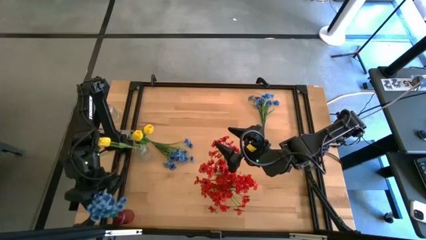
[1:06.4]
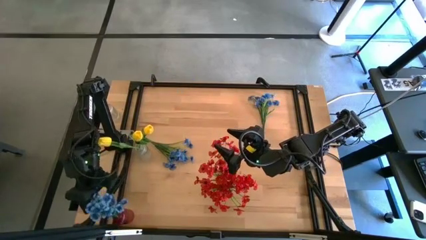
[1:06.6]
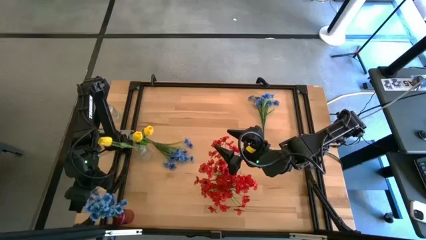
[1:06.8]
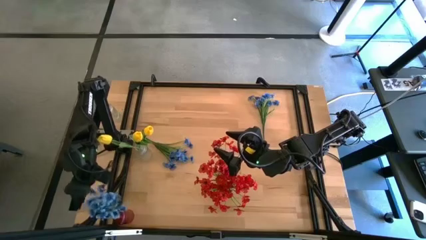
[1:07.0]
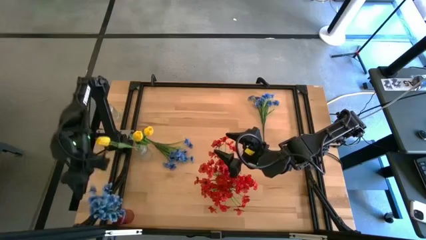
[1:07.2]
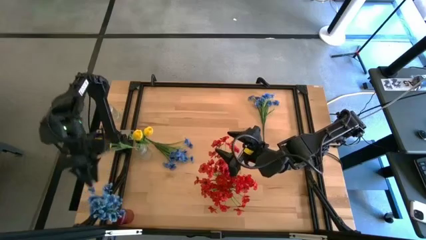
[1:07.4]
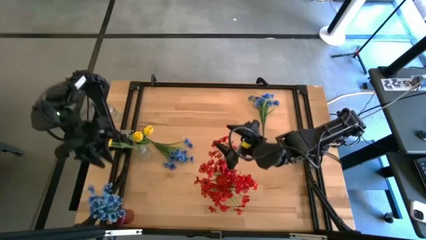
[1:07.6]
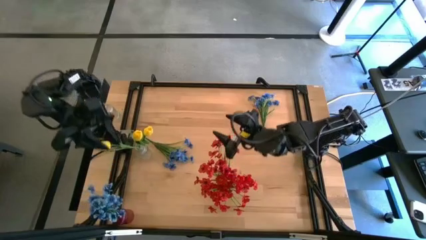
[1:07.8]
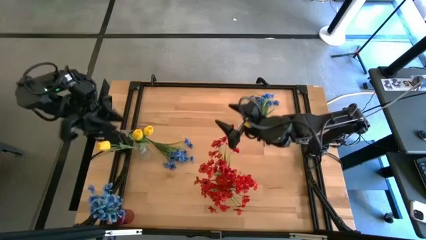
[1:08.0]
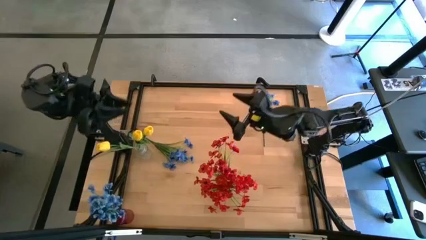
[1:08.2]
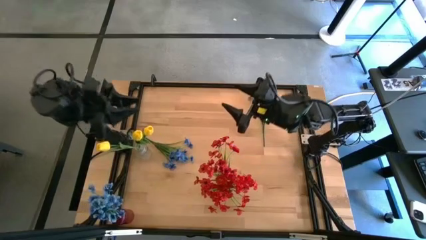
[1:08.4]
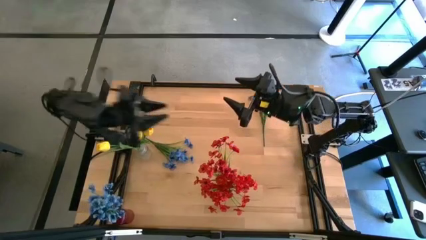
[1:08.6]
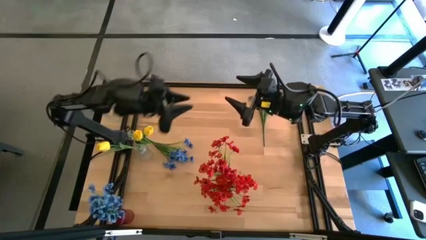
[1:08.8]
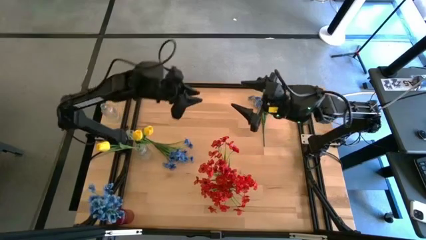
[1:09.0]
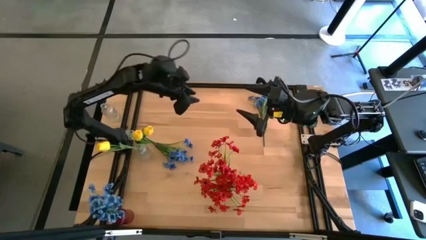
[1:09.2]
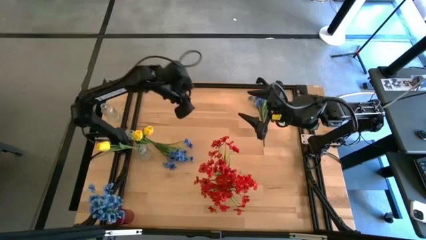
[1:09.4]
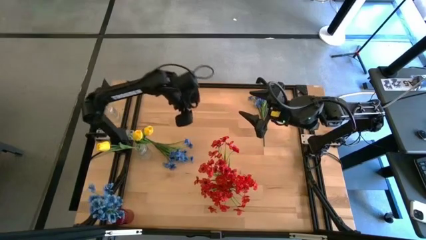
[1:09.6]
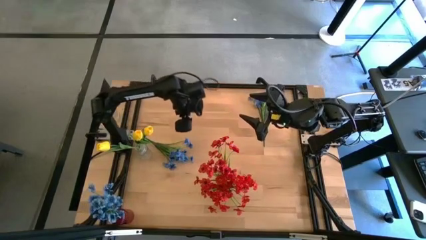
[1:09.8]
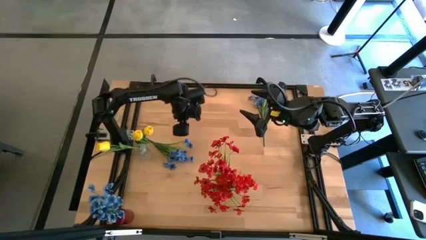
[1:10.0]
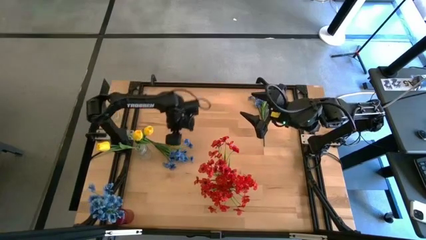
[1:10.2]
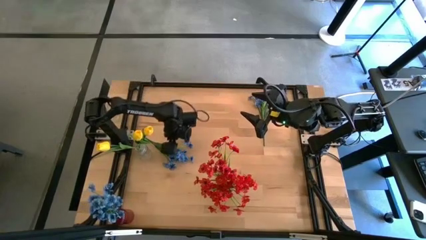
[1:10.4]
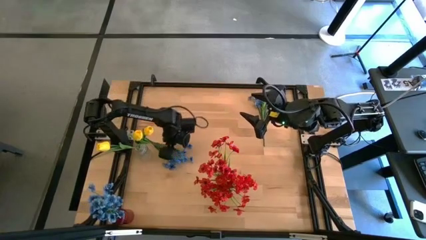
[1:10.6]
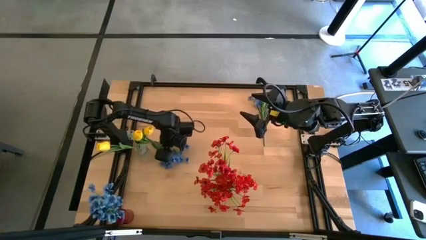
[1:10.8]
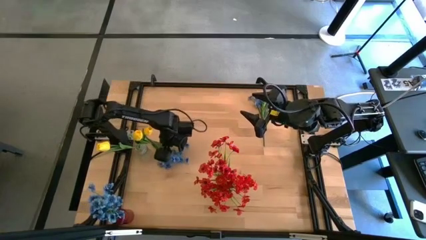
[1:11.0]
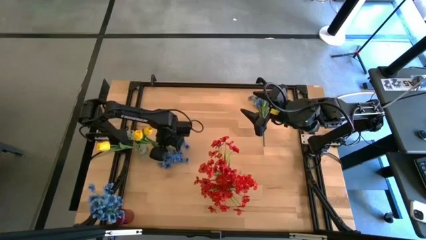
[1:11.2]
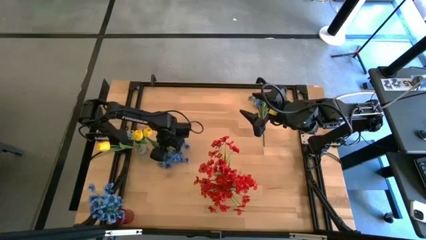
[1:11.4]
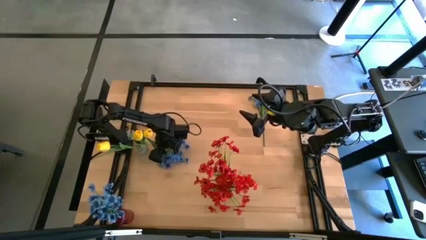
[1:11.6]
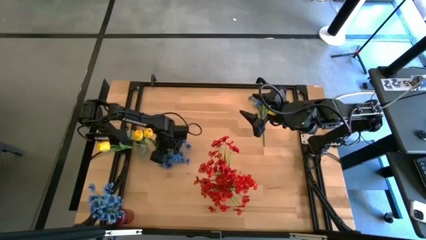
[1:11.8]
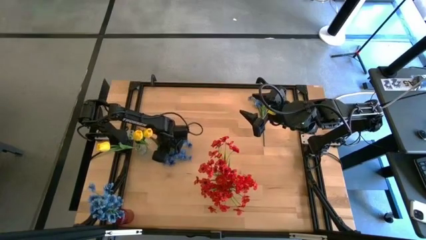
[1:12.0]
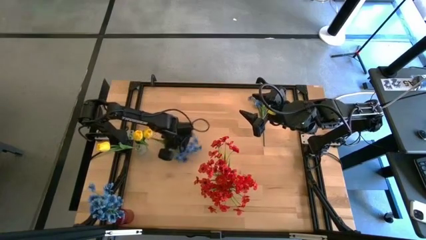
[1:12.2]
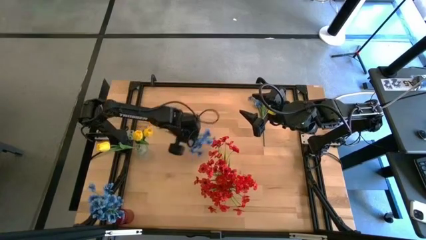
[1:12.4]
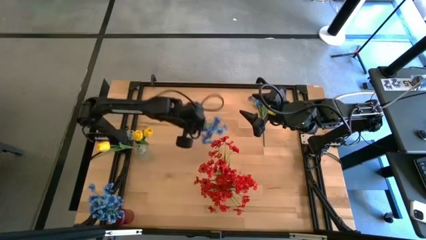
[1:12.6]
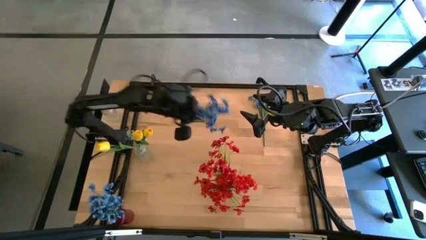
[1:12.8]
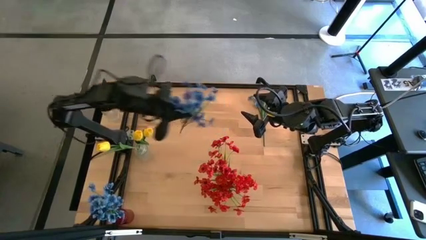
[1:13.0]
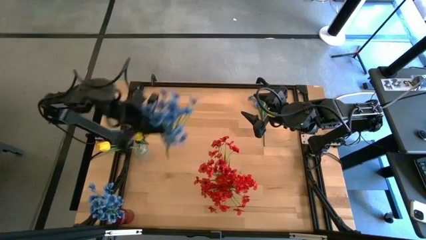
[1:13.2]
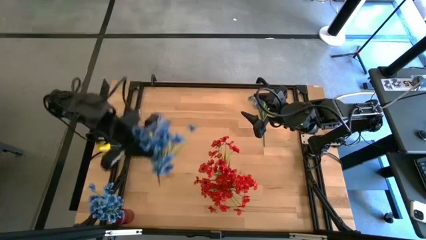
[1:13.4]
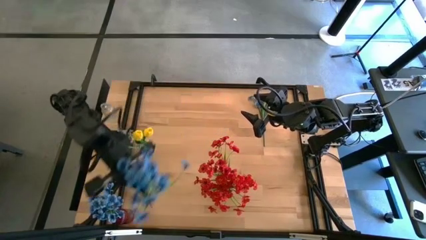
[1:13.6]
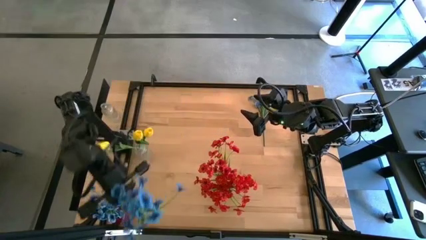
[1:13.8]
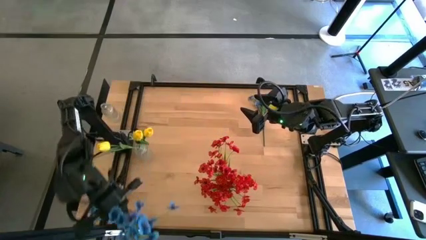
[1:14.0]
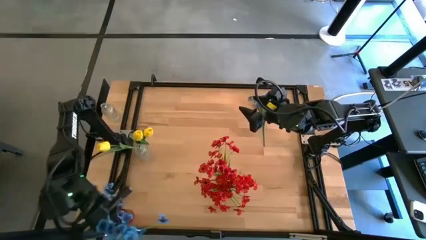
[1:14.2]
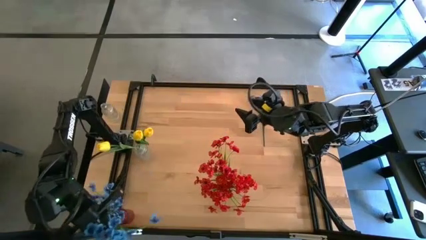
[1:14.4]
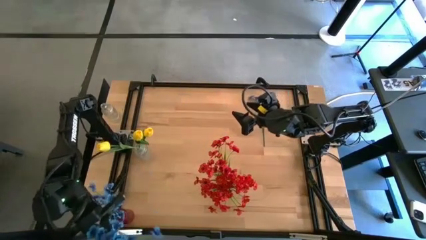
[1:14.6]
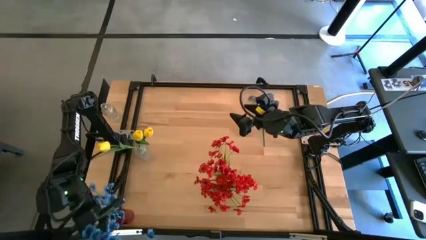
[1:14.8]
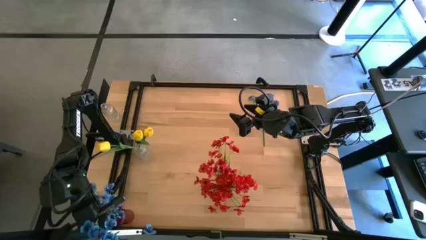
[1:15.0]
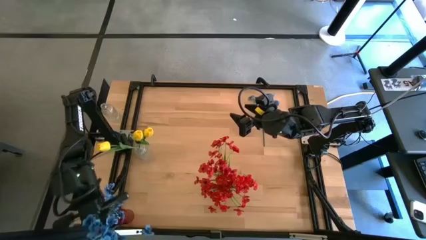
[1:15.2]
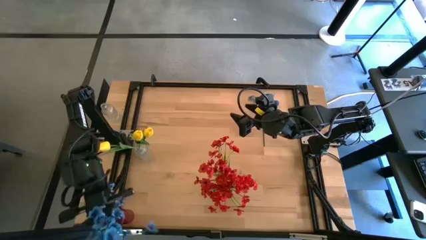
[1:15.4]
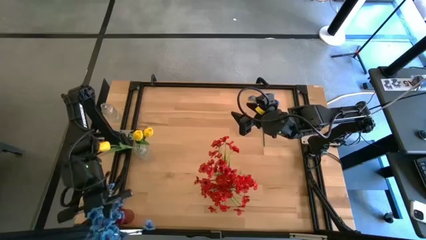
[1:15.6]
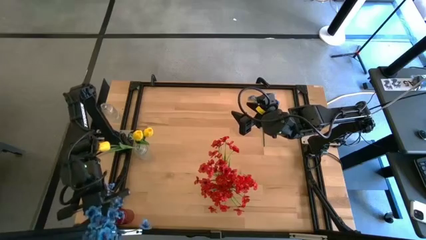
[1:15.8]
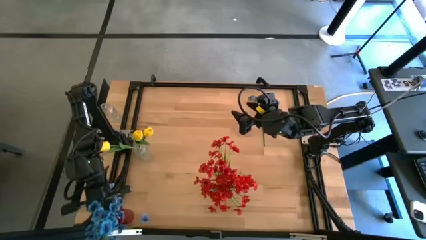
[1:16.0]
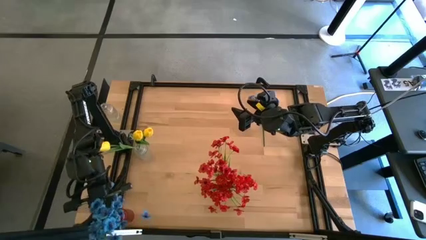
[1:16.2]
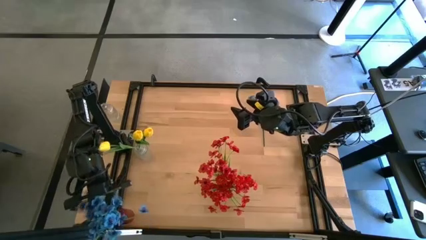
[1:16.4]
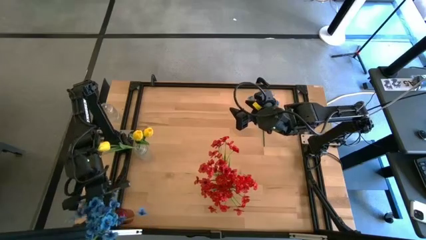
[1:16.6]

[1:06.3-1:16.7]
Task: Sort flowers into vase by color
Put the bottom blue flowers into the red vase

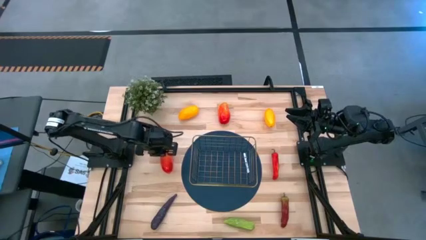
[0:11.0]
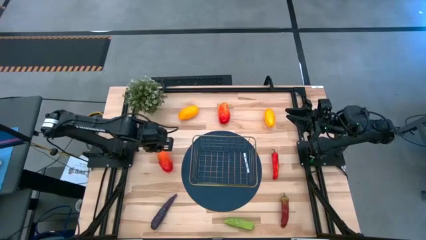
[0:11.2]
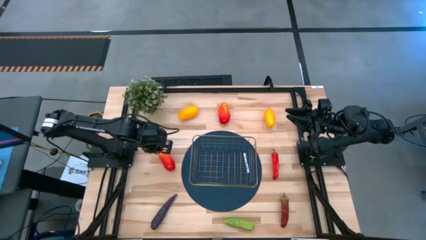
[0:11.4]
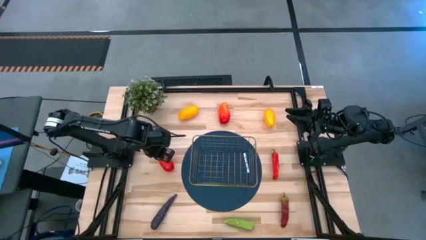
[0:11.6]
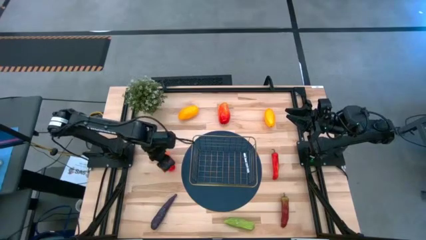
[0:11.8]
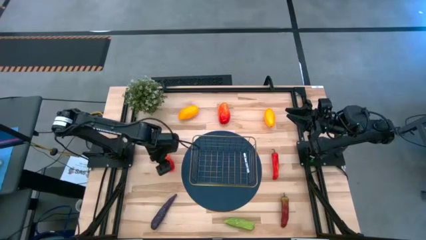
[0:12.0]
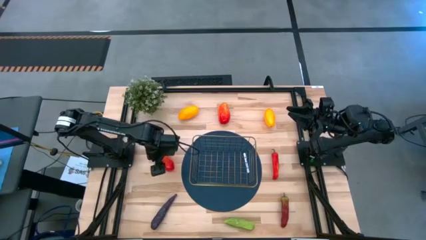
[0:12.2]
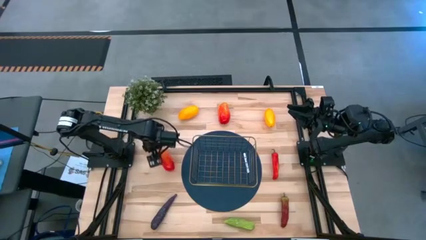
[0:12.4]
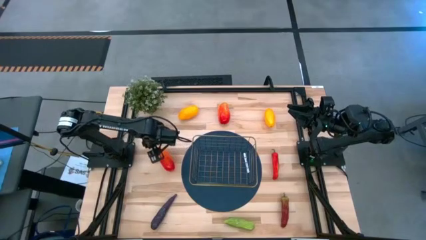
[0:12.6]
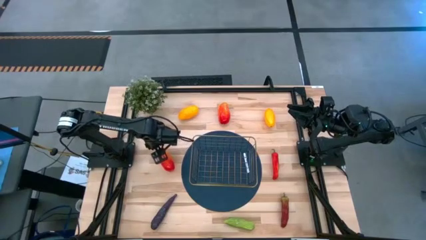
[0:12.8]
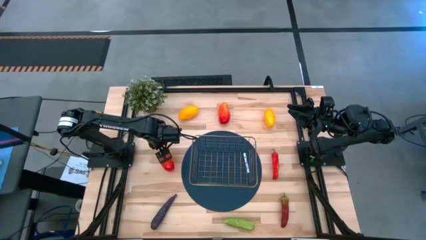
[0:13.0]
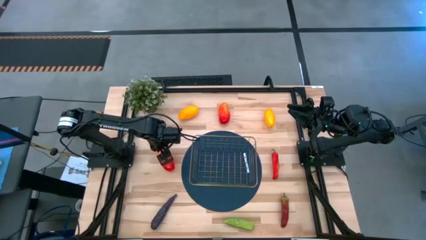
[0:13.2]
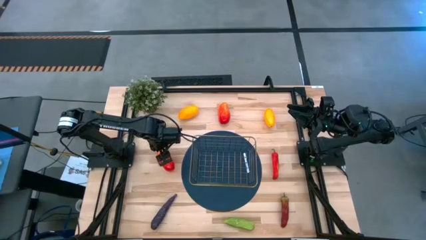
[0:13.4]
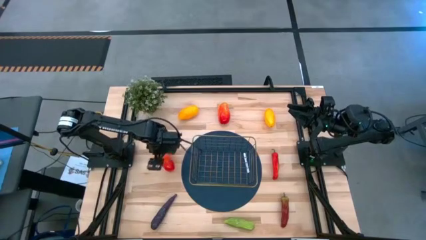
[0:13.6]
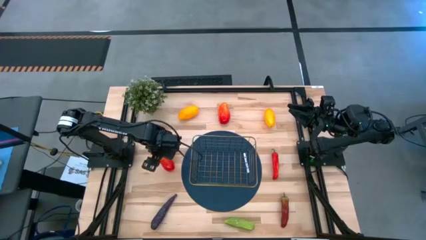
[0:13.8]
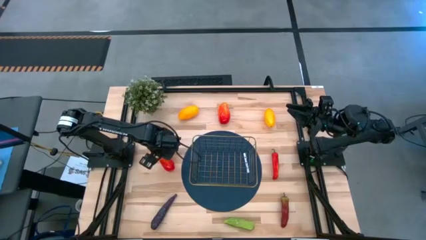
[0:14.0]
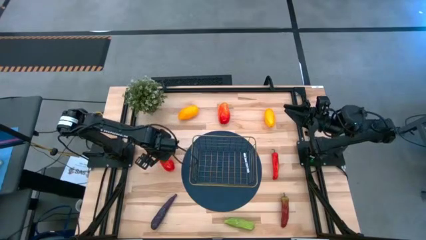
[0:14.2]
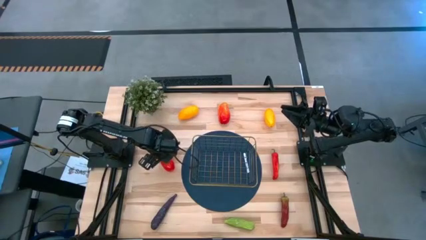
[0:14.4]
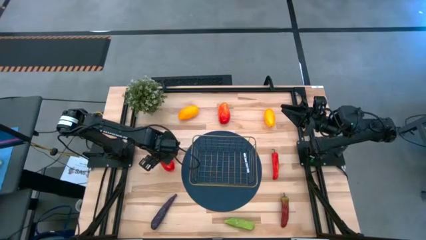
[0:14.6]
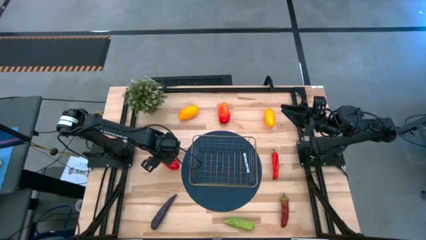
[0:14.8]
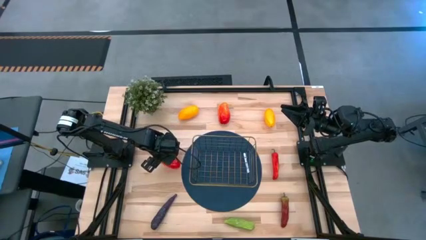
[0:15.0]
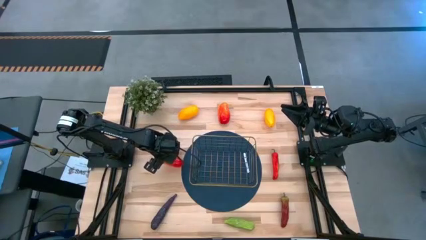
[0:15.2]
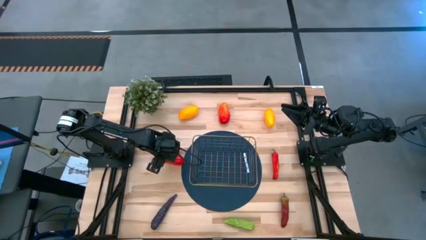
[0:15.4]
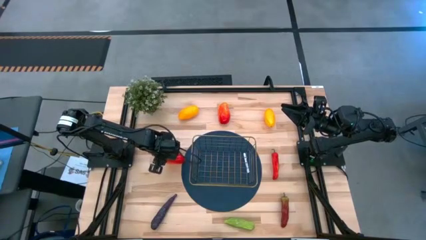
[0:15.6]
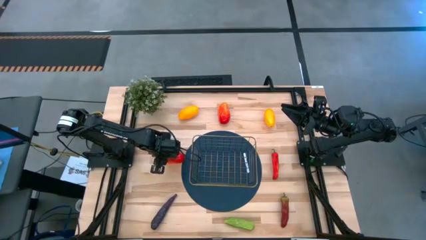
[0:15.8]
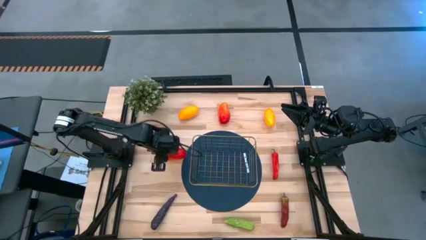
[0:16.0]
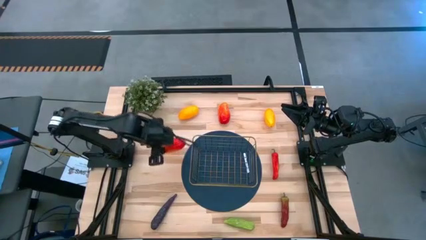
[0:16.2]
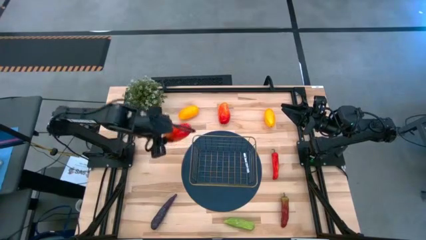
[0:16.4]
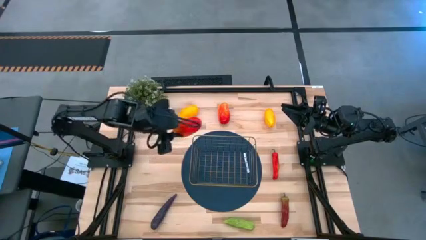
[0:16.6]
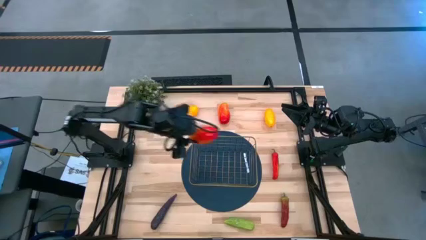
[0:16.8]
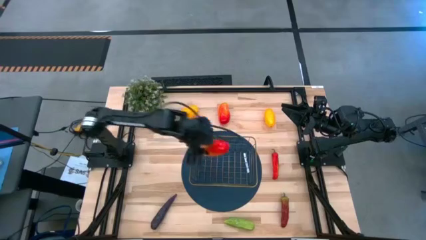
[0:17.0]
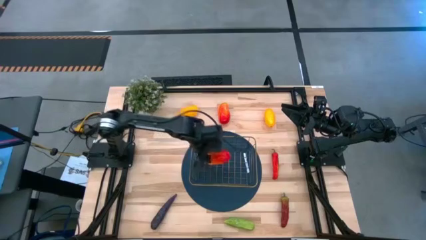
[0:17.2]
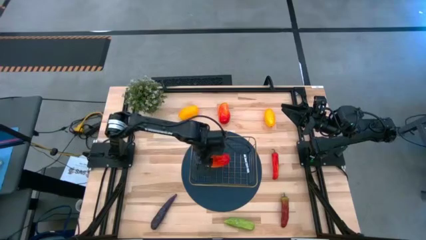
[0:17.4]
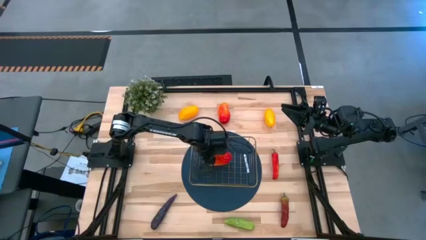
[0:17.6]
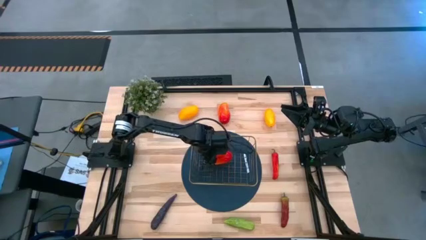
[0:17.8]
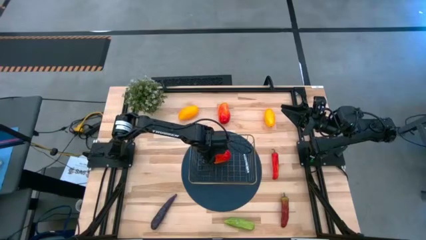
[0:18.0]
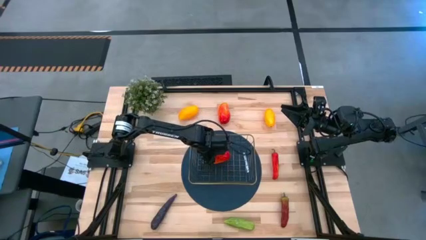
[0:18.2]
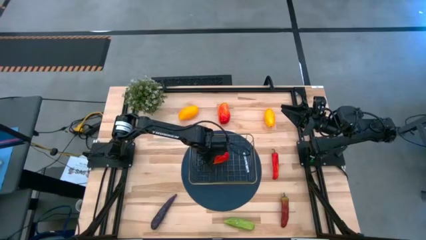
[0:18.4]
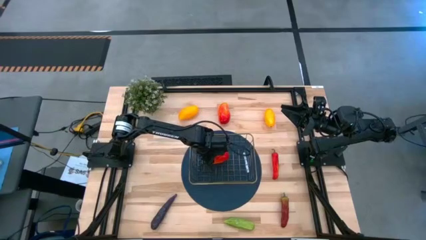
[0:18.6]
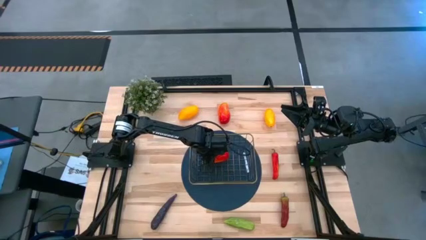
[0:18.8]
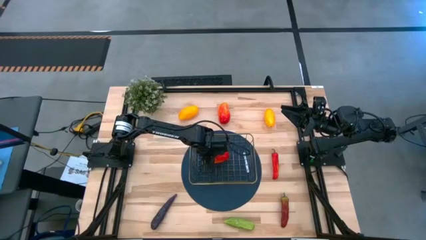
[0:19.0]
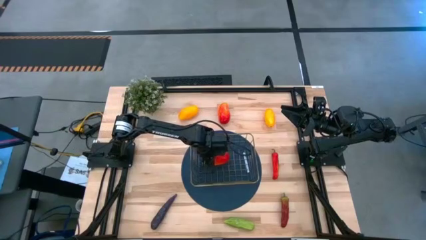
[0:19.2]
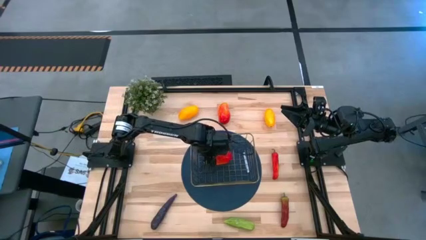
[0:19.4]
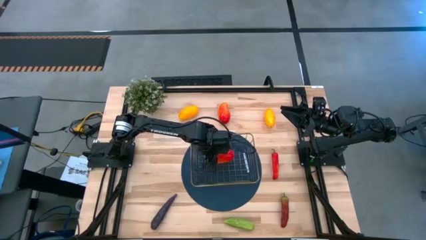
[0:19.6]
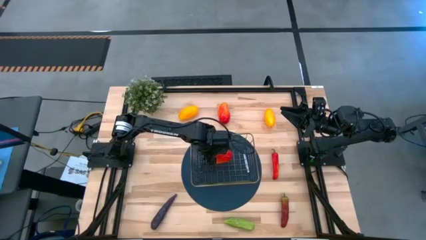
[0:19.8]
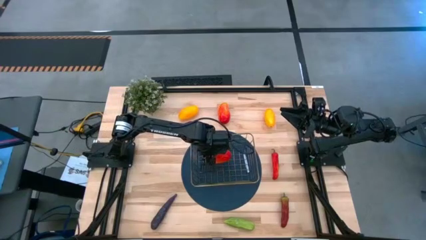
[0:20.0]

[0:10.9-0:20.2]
Task: Build produce basket
Put the bottom red mango into the gold wire basket
